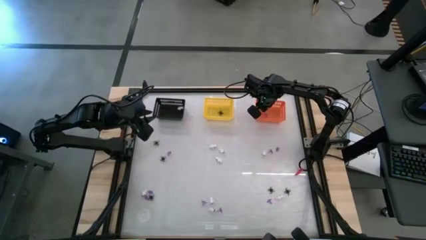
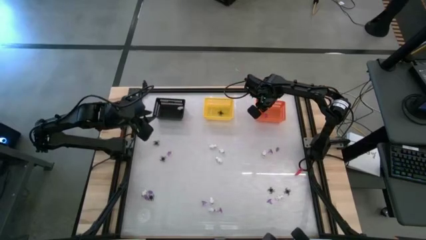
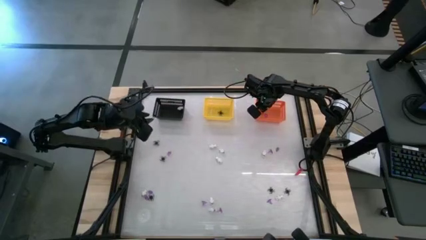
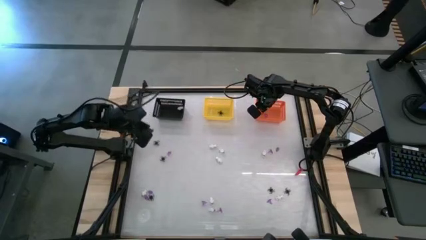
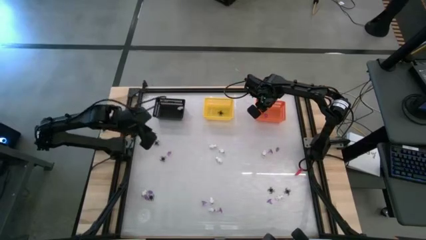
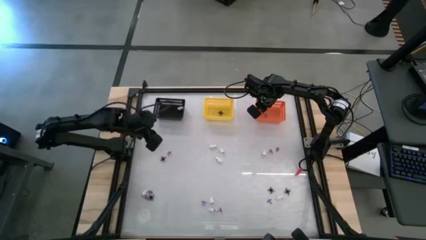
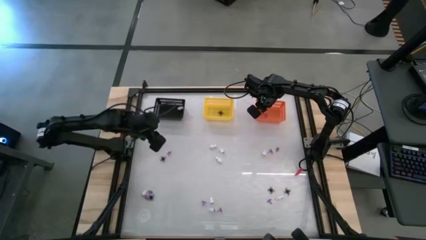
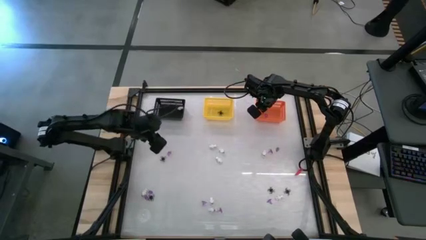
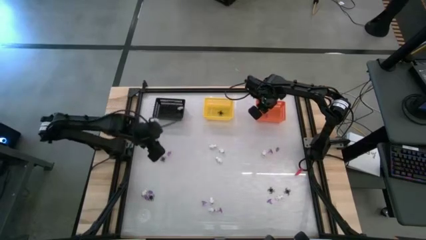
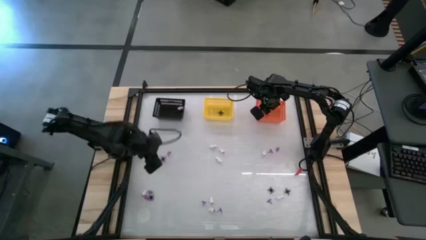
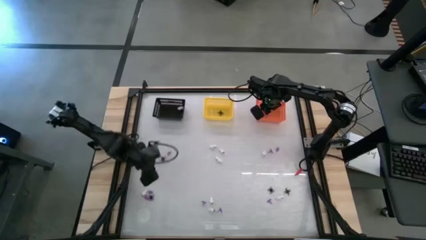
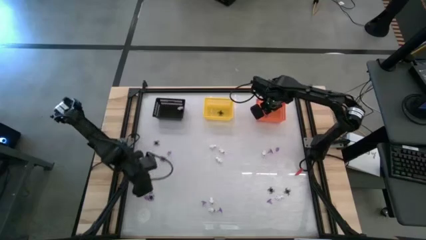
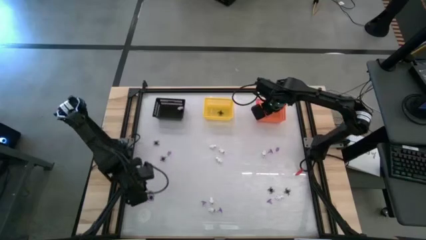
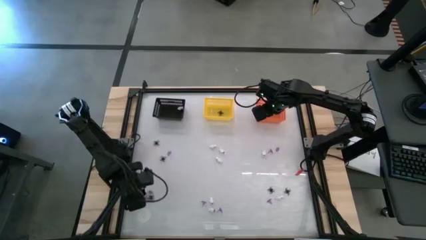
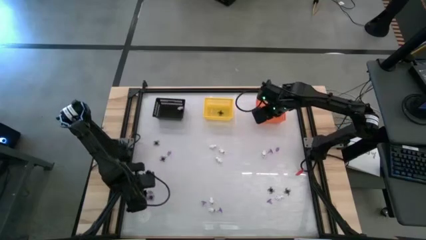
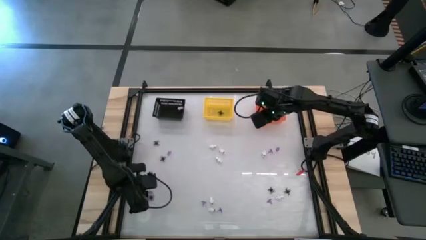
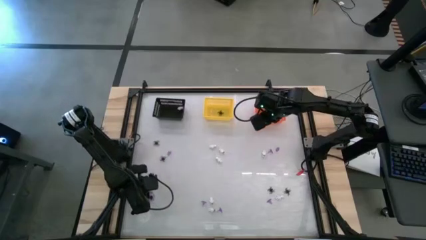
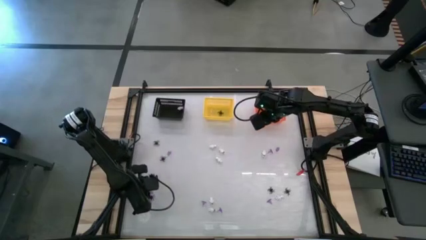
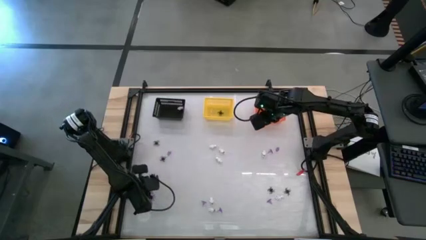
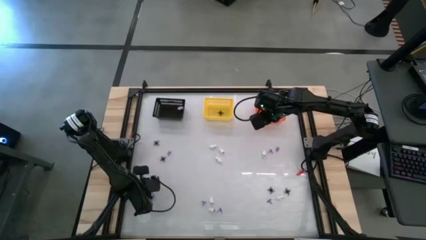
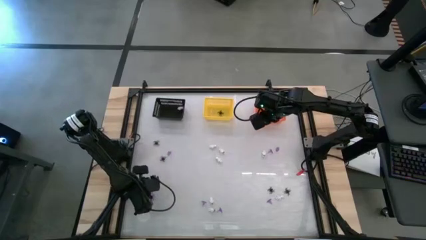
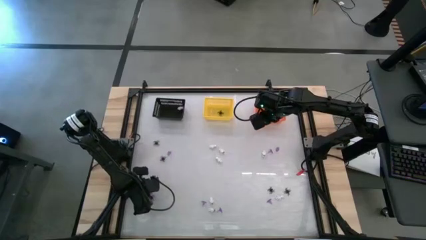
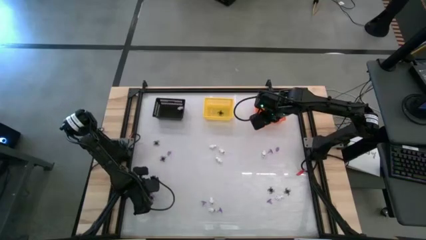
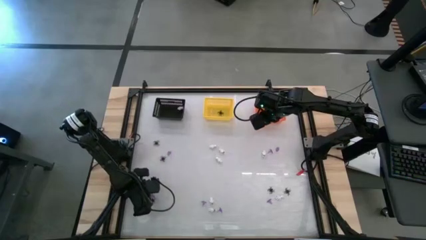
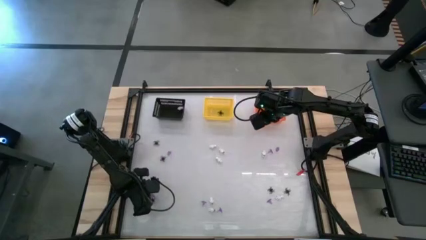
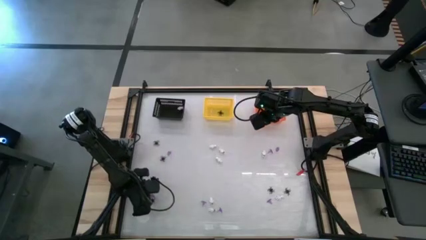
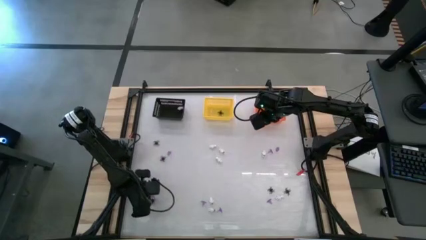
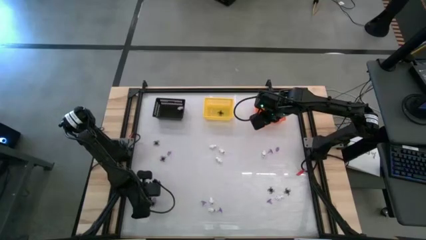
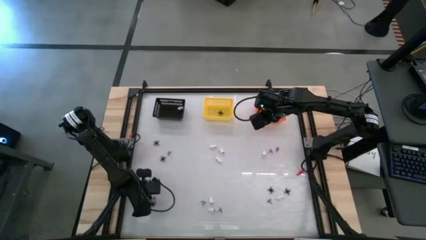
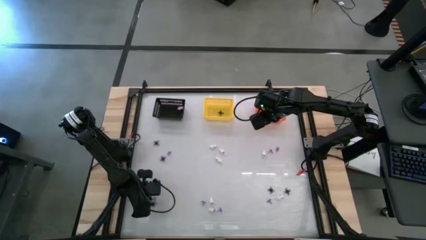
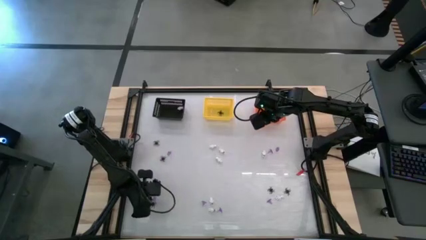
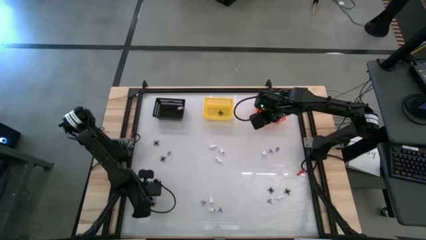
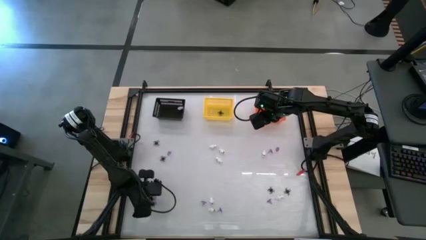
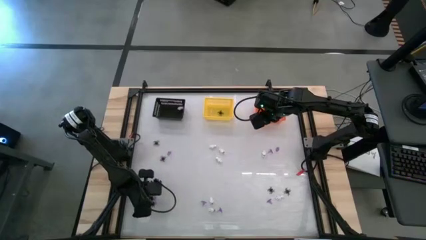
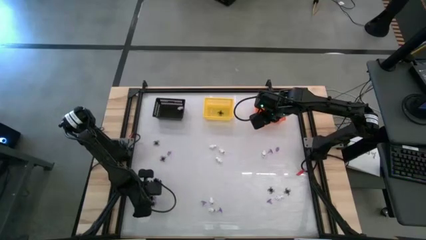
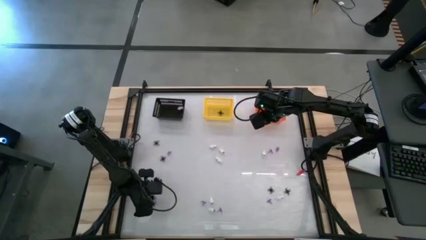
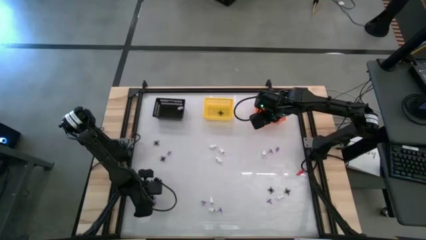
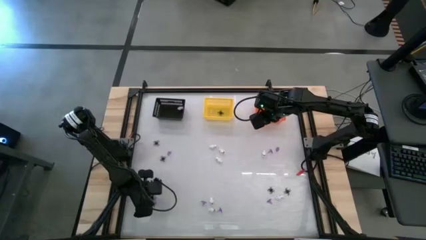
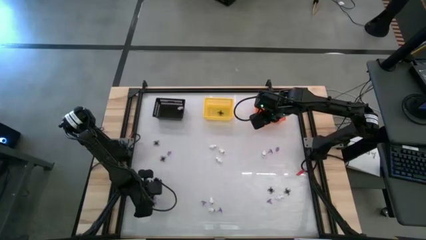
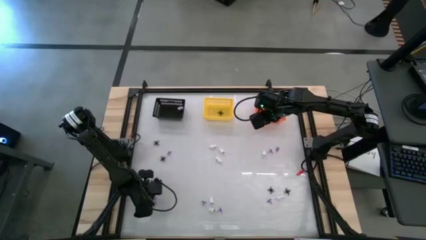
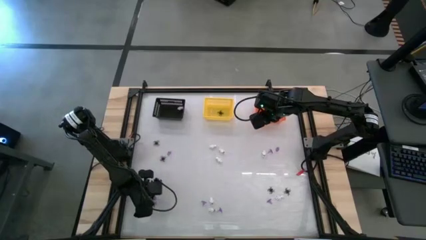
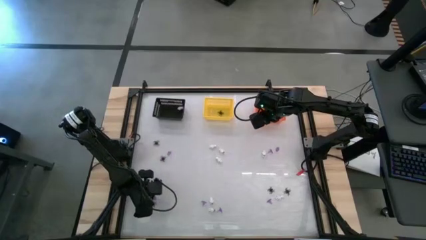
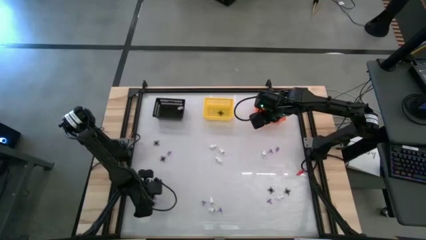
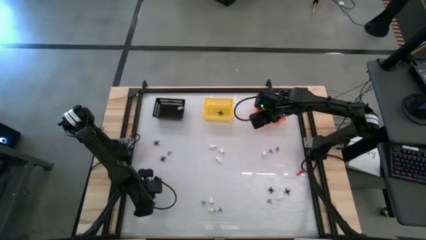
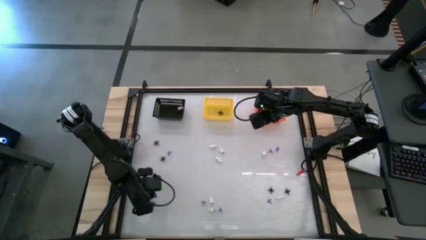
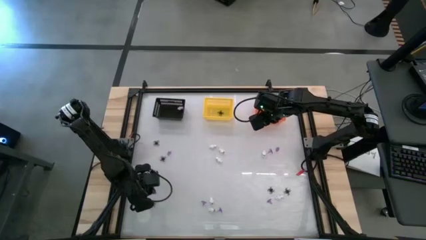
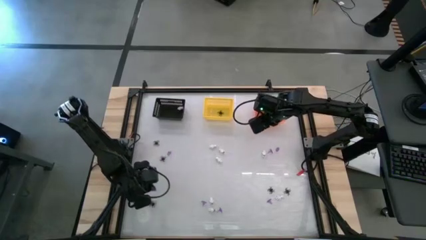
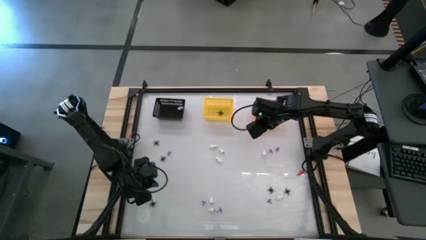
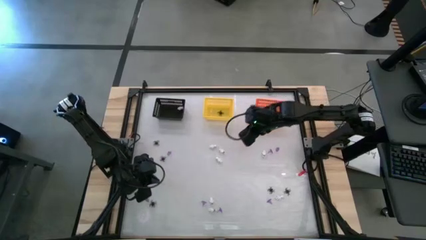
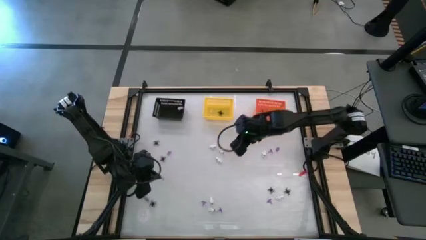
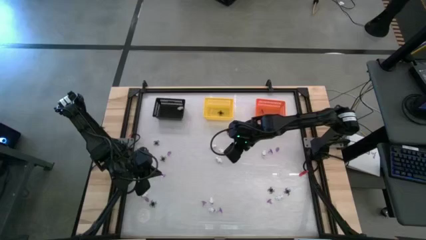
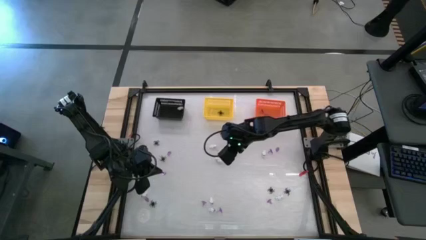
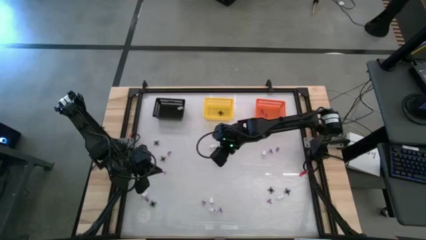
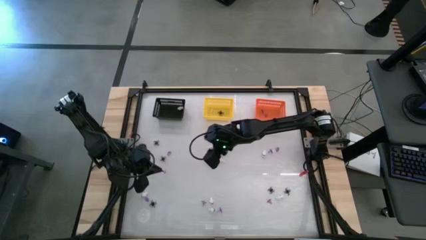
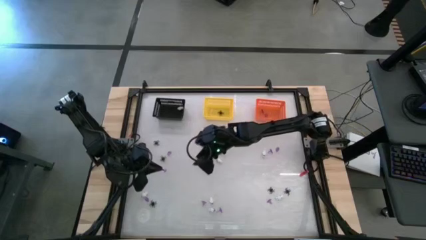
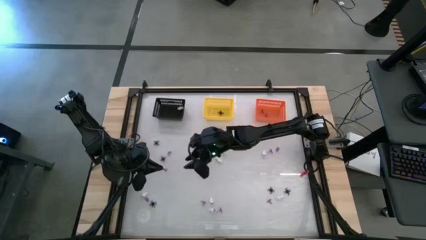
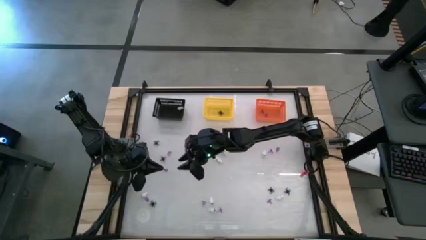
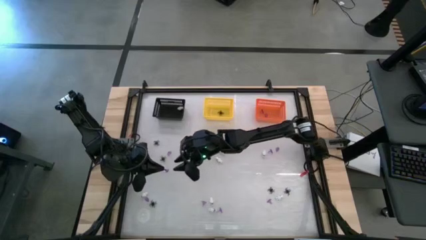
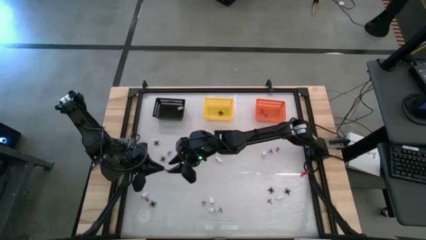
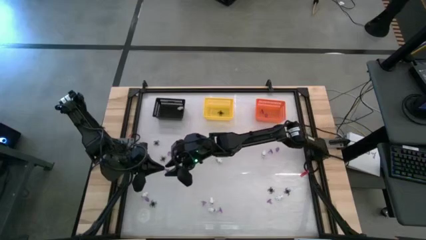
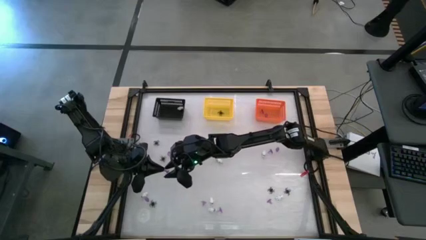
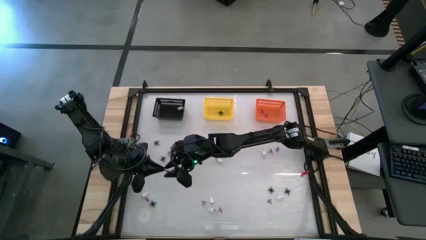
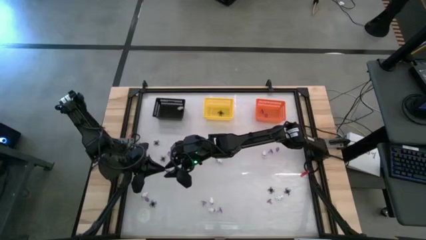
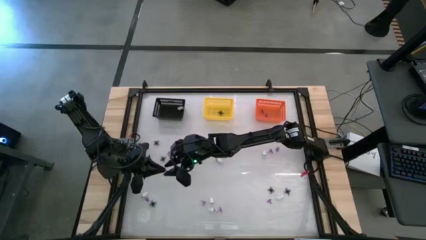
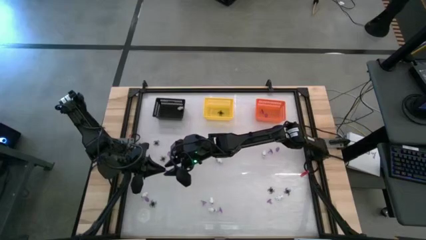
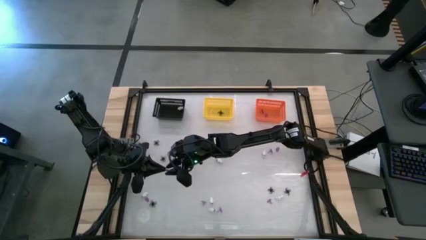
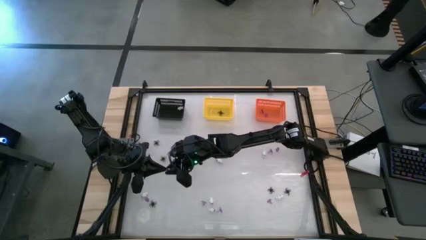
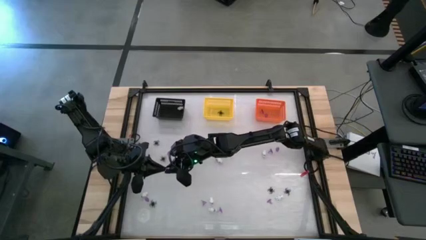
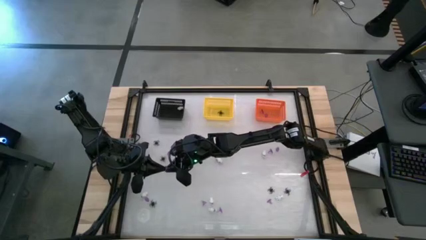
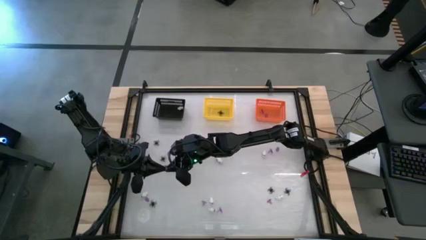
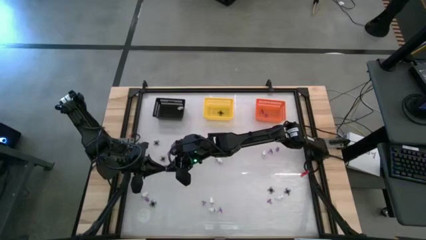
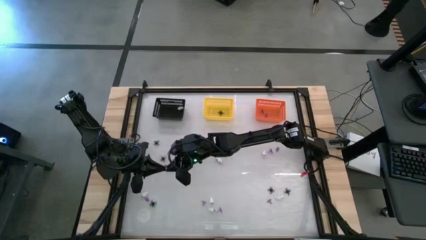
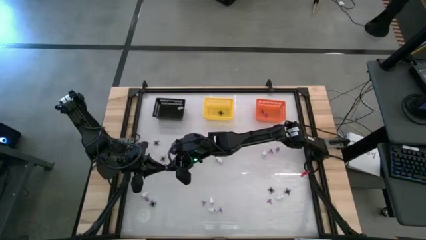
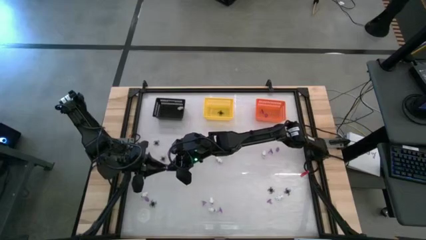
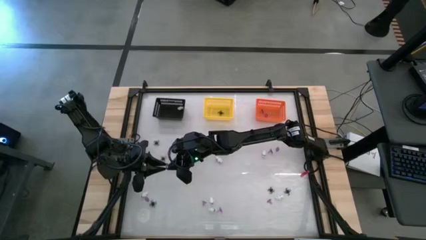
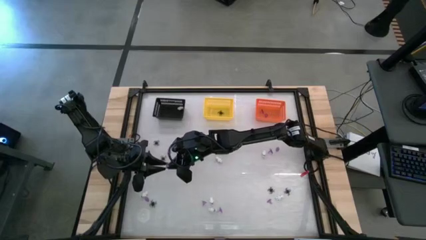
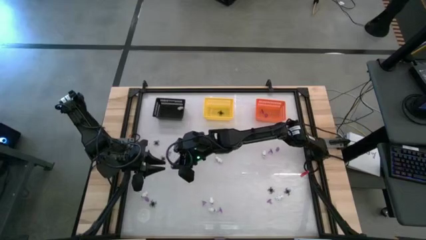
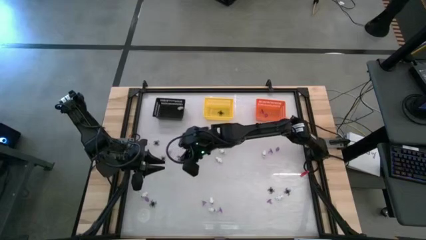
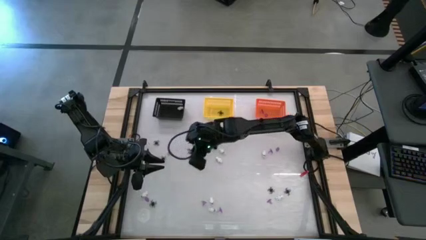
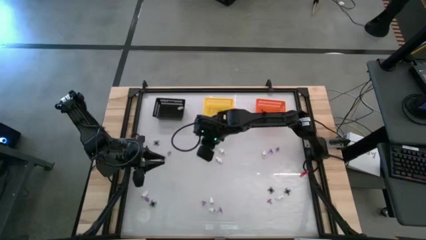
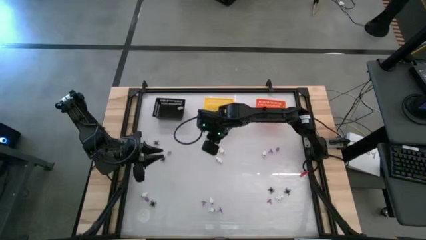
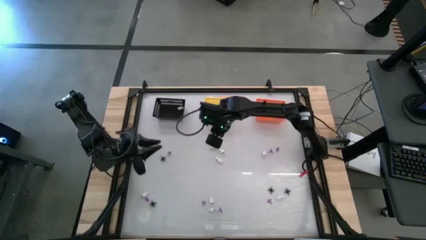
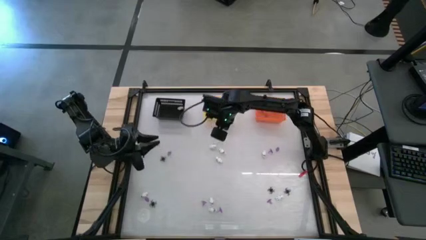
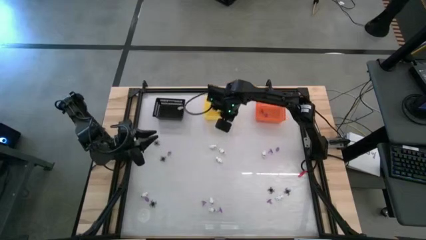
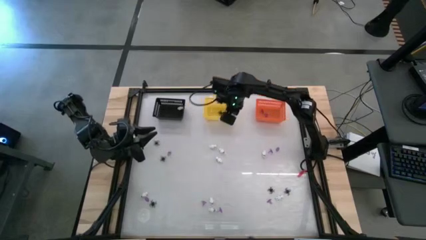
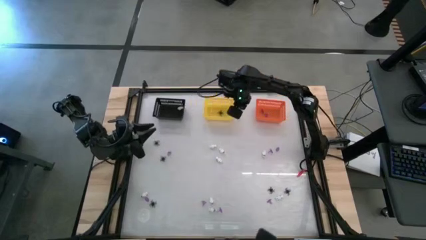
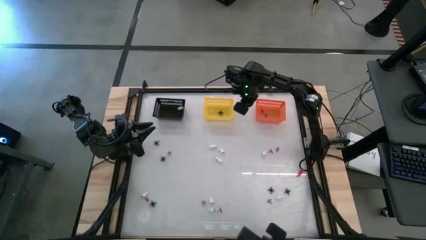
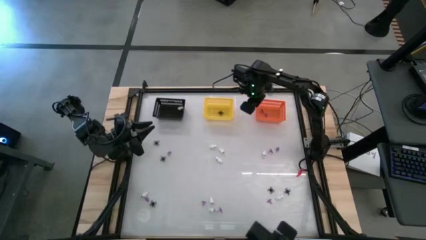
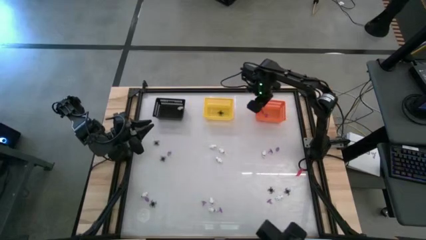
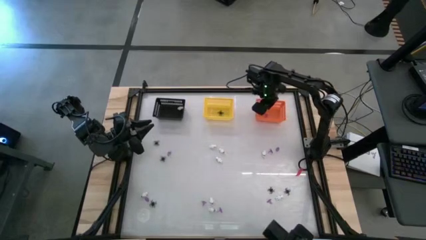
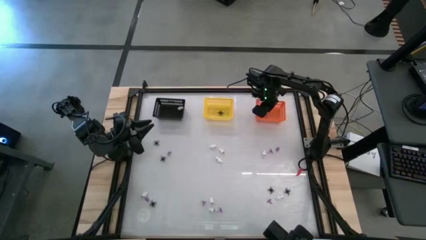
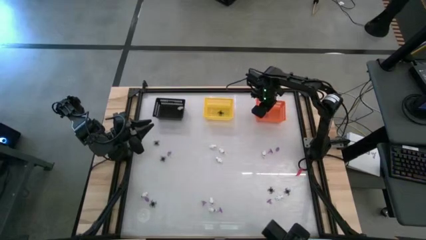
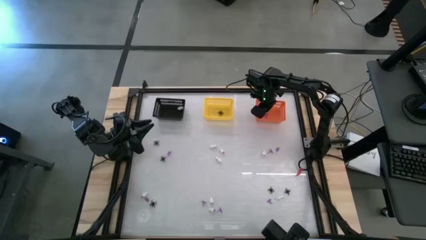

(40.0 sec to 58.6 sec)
Task: Sort Halloween decoration
Put the purple witch hat toy into the orange basket
